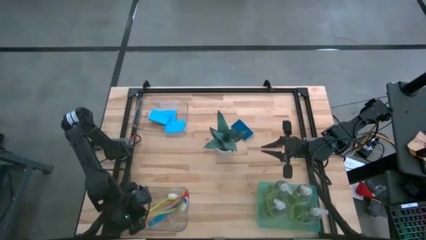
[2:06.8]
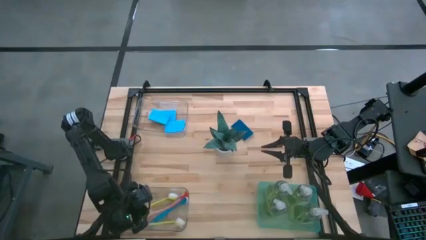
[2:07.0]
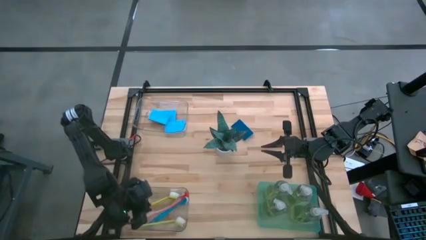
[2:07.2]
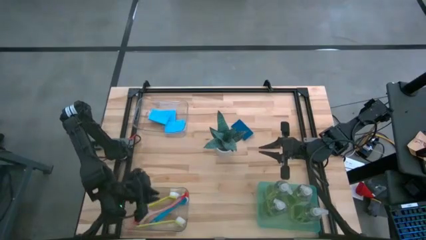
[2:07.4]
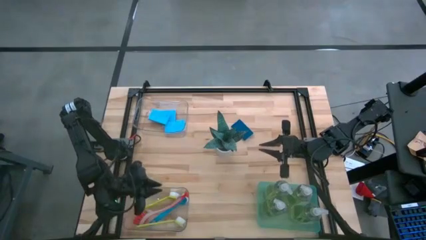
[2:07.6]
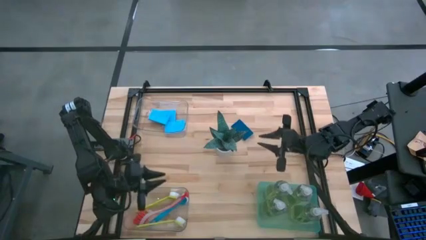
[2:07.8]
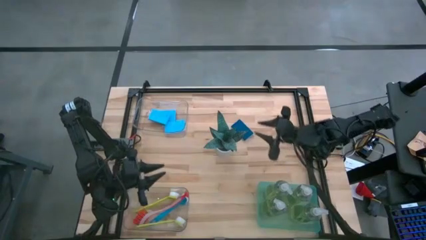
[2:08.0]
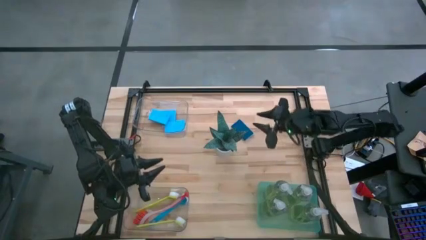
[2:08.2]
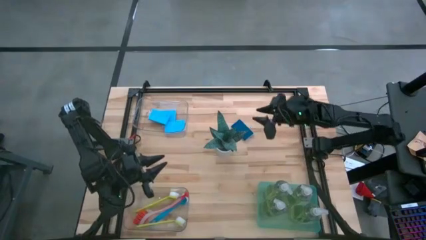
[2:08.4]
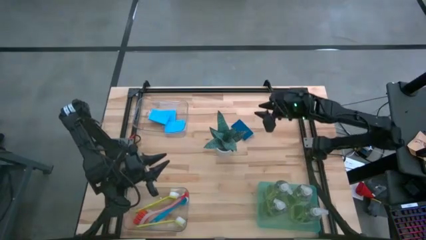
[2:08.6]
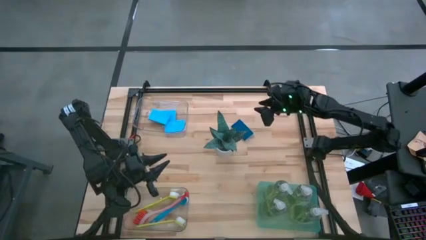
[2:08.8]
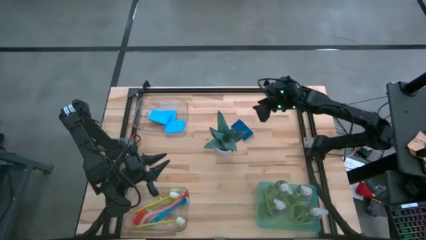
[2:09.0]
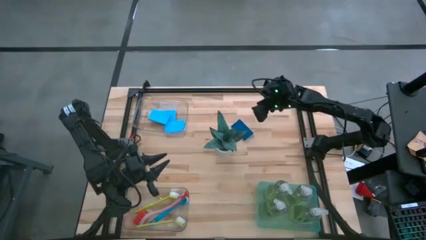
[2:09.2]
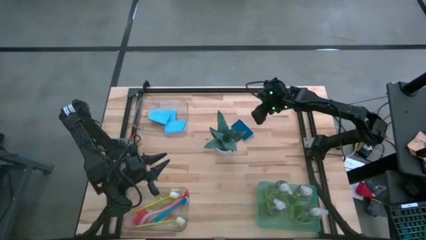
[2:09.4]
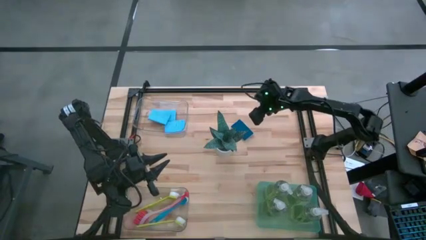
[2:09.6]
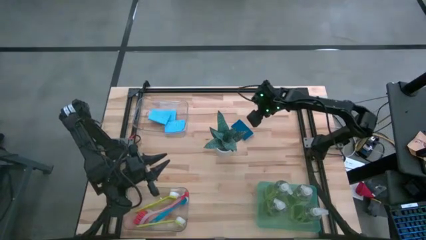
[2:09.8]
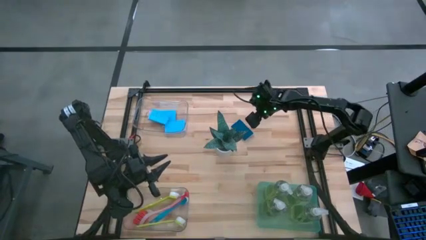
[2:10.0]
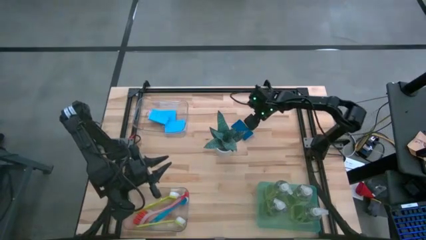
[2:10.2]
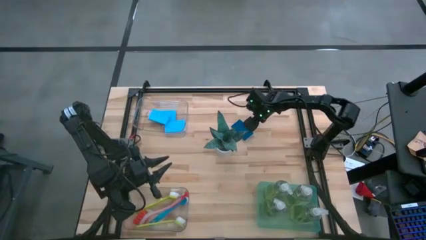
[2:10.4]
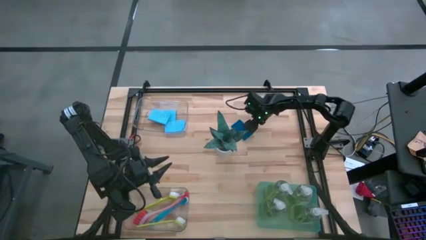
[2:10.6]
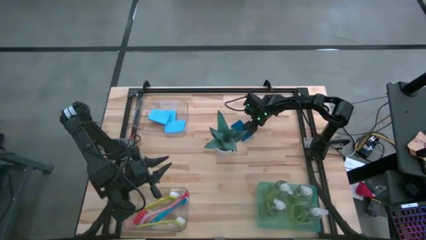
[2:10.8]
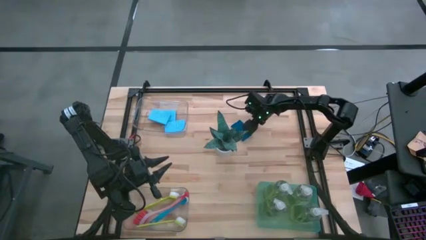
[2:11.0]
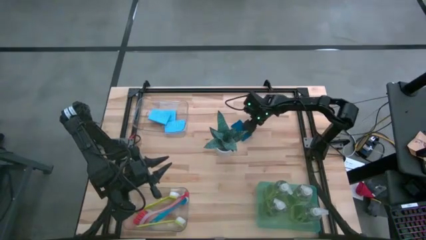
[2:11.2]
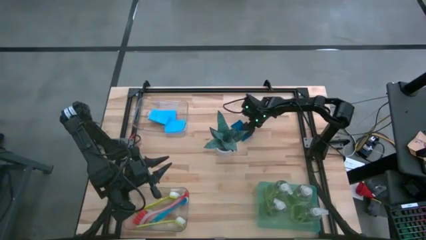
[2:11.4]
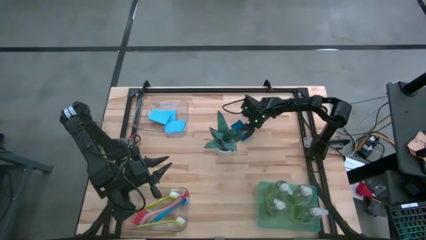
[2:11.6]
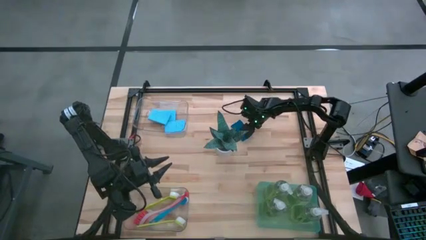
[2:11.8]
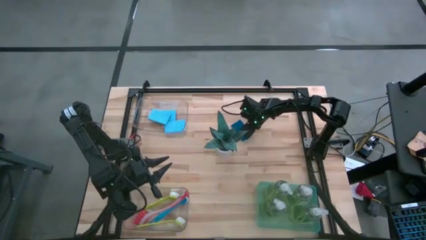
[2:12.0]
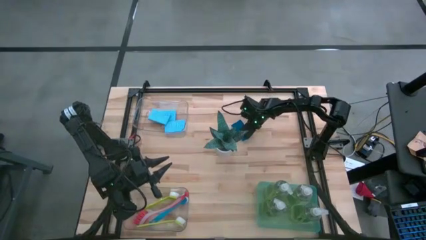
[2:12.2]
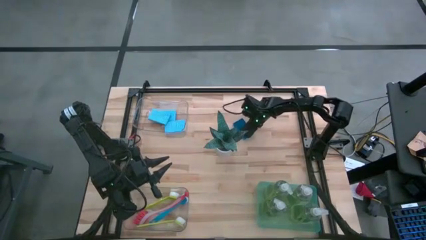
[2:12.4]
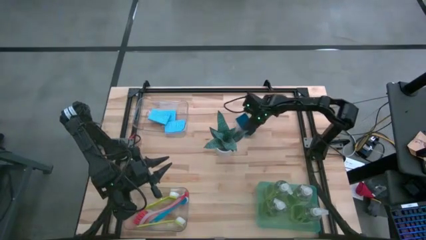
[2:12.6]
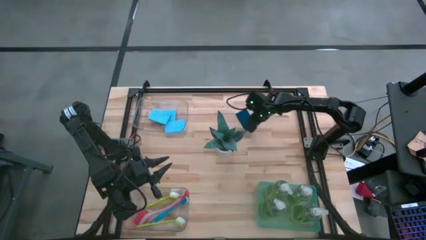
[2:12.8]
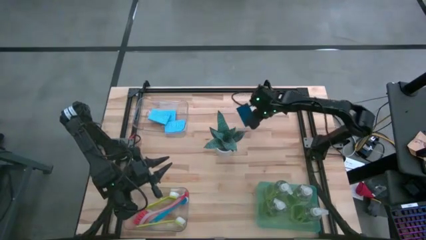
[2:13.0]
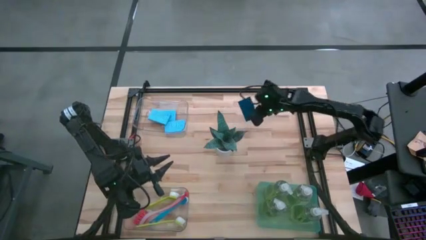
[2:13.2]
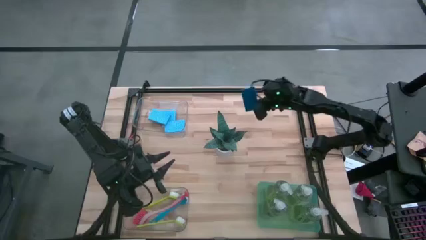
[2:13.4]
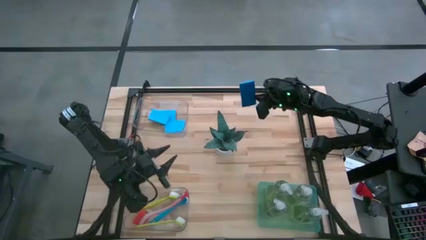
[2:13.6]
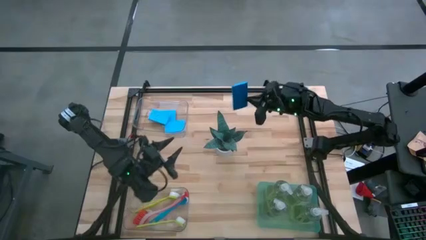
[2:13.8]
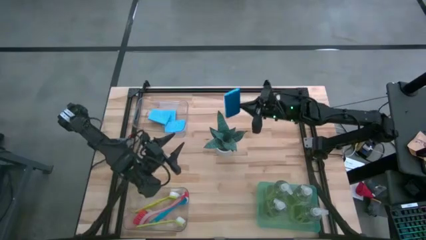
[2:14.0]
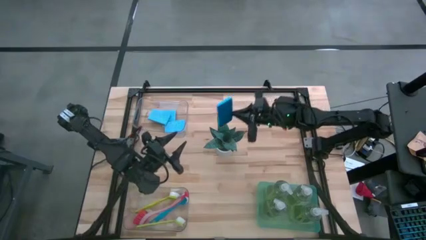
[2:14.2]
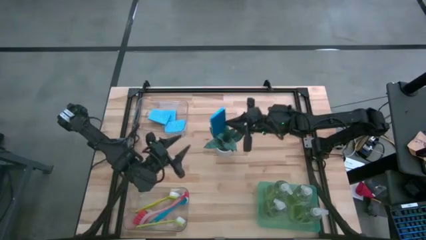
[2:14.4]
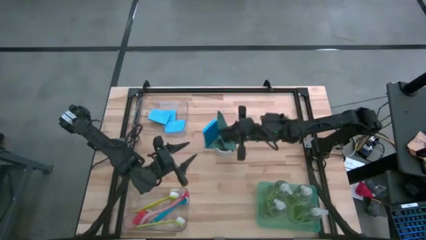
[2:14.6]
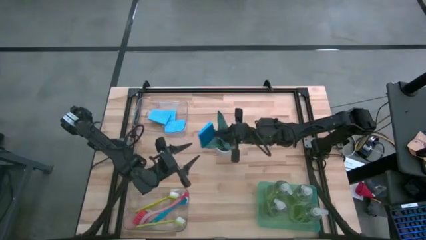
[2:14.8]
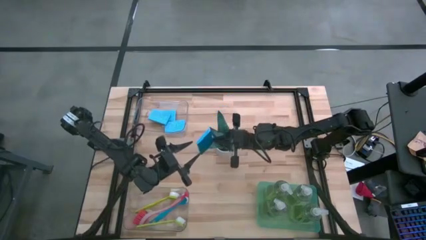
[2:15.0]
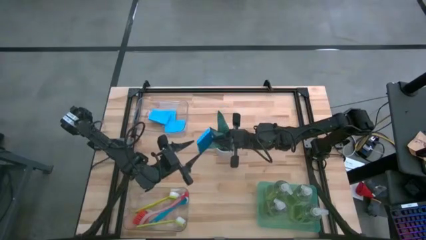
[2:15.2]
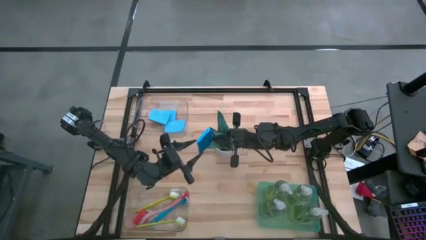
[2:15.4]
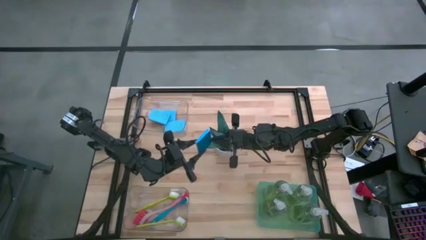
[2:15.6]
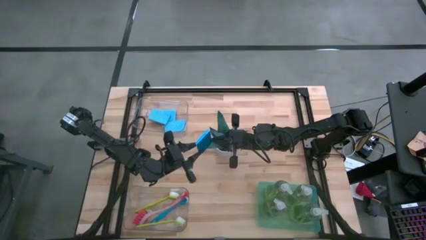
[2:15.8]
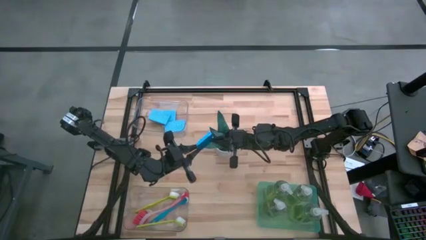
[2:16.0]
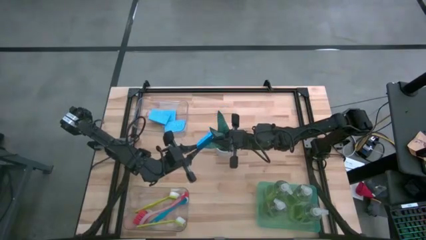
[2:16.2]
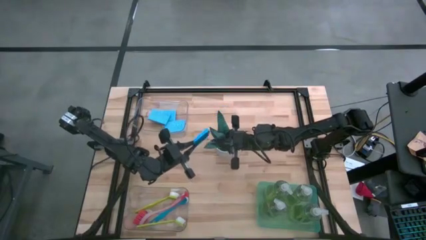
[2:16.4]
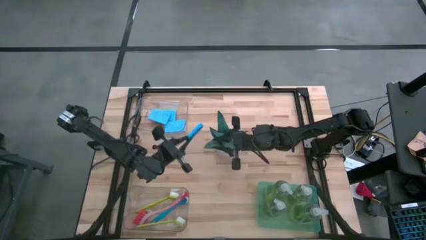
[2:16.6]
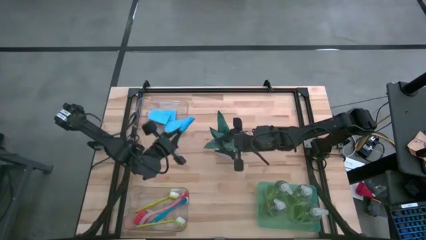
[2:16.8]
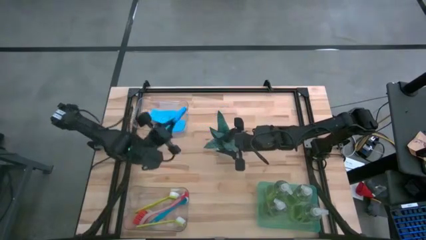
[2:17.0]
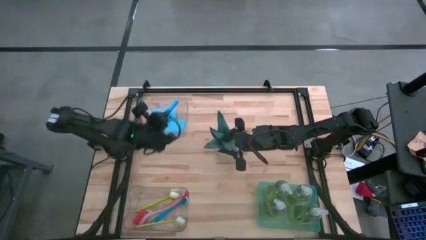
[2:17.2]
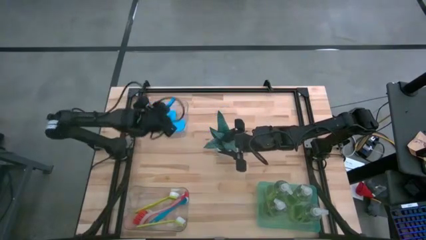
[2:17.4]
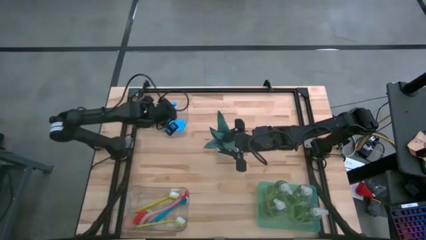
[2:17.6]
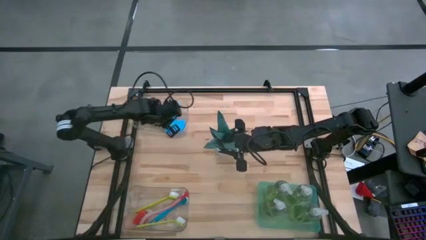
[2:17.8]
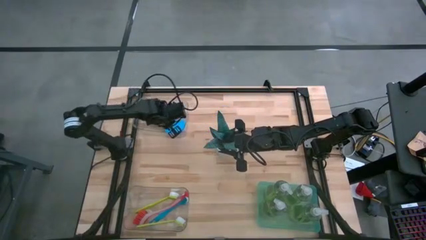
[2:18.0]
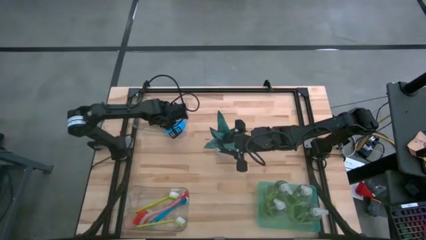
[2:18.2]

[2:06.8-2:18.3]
Task: Pick & Place Kitchen Sink Supplies
Put the blue sponge into the top transparent bin

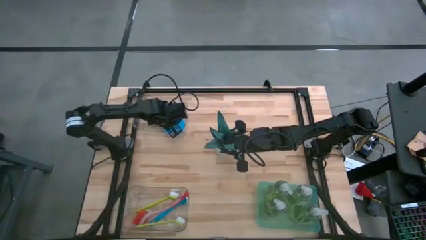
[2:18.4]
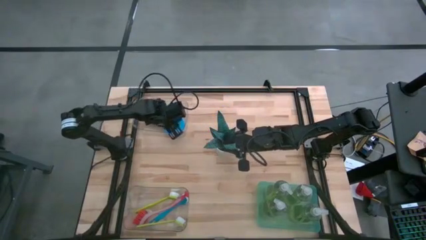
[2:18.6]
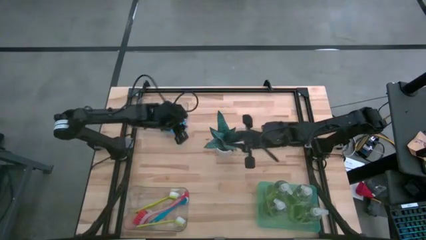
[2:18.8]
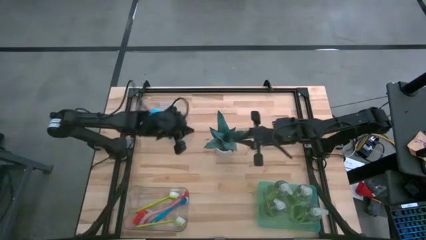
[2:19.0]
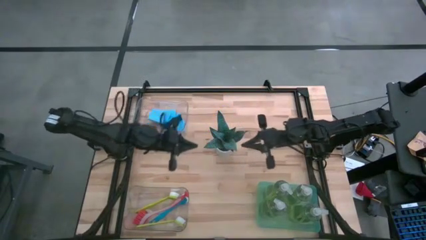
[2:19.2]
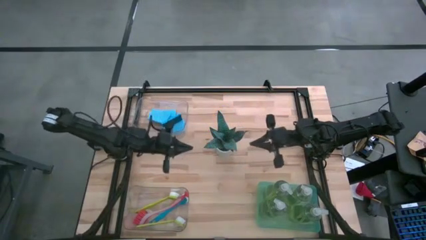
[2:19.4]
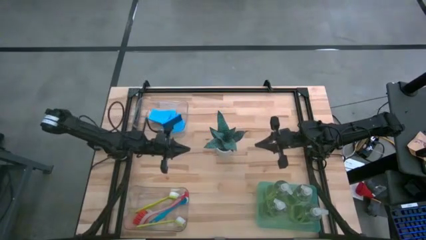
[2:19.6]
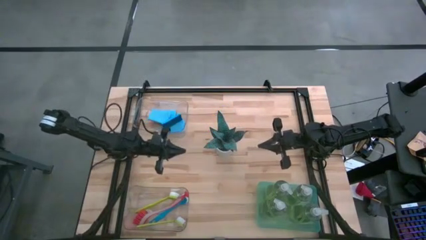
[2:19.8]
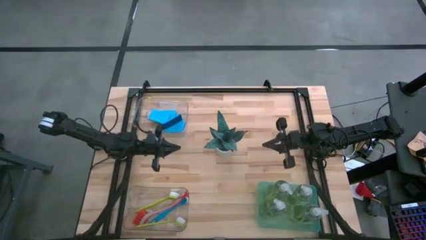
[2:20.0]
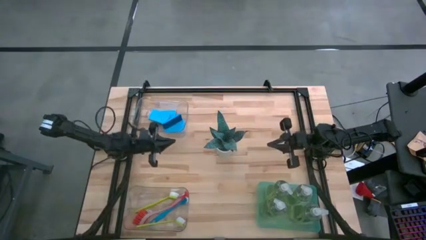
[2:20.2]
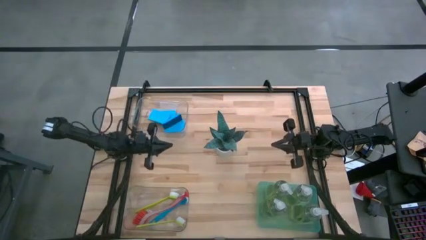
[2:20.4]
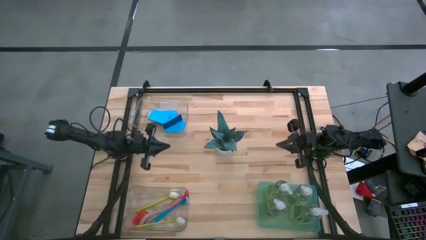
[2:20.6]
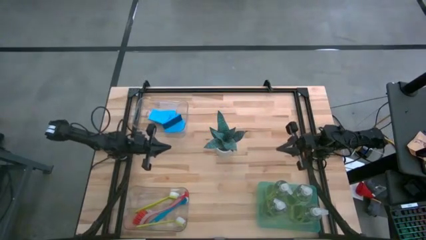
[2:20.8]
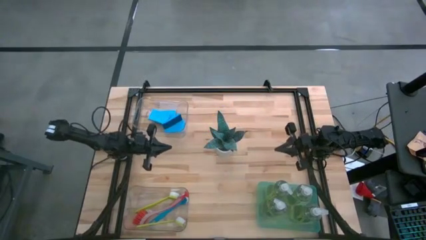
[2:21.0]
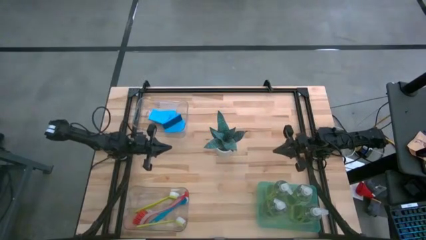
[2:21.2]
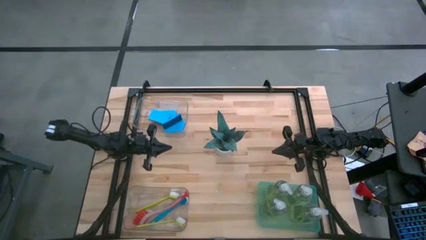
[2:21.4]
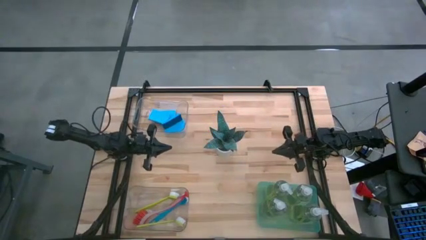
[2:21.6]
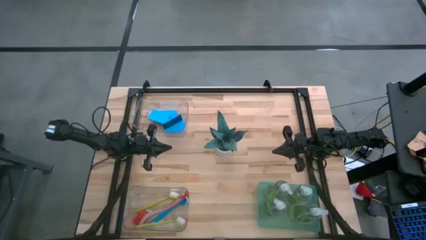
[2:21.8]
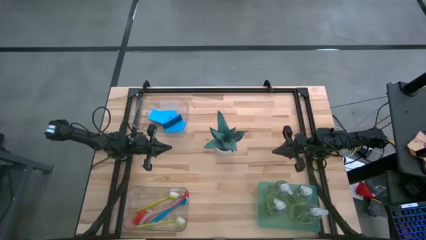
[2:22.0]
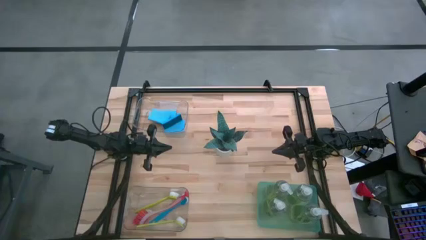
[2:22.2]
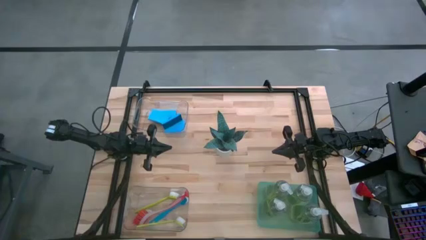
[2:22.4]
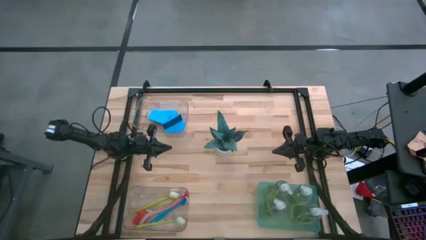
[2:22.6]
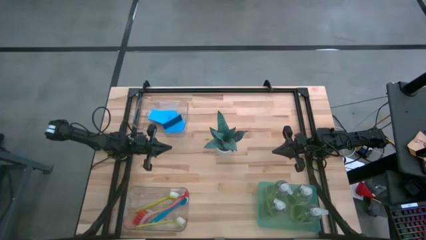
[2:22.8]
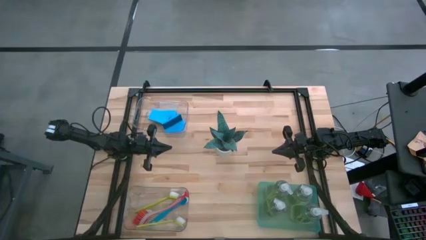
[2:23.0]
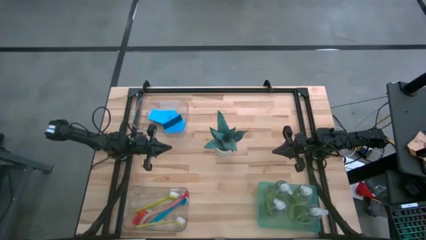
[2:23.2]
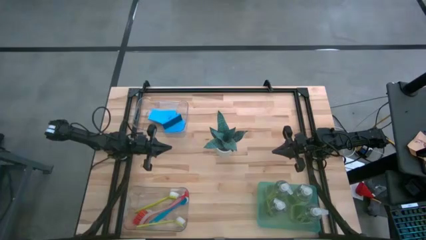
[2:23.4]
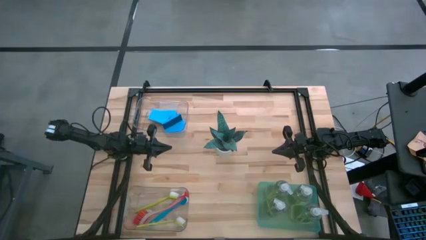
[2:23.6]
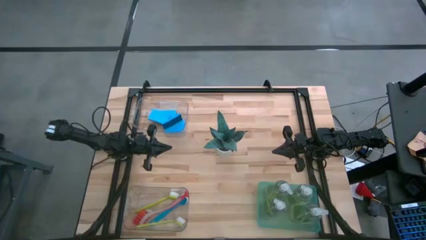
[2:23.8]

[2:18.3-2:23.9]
Return to Home Position
